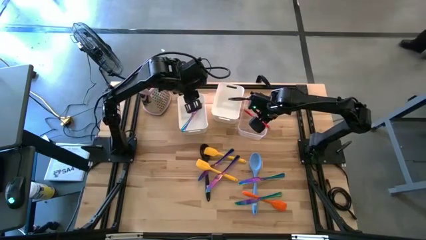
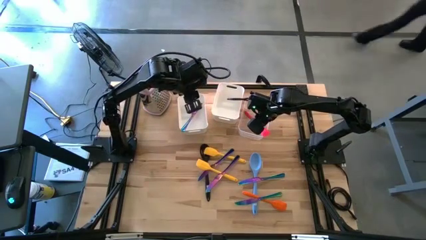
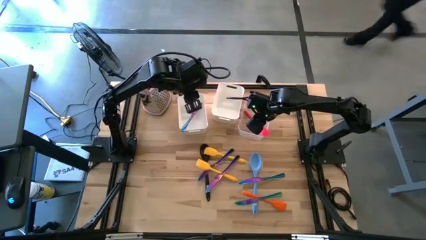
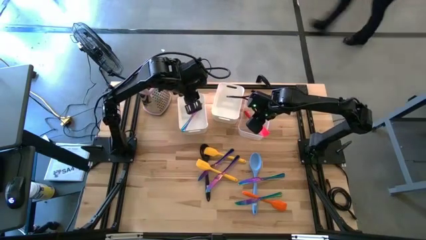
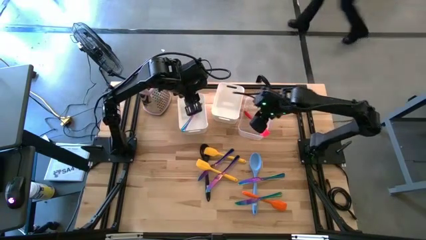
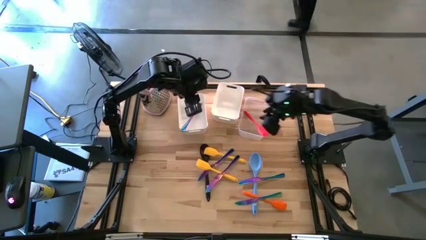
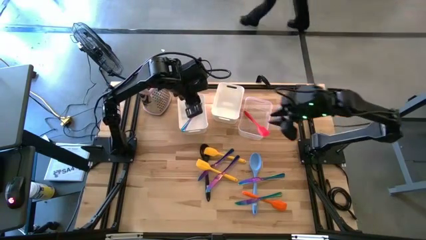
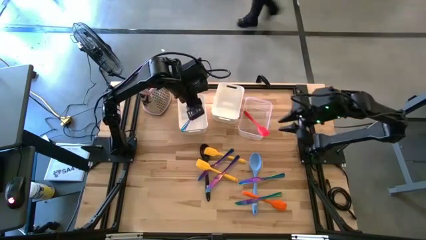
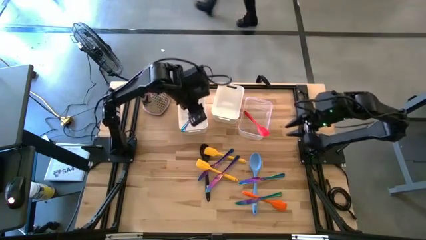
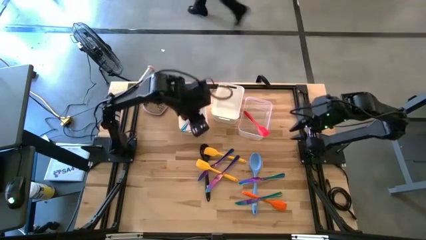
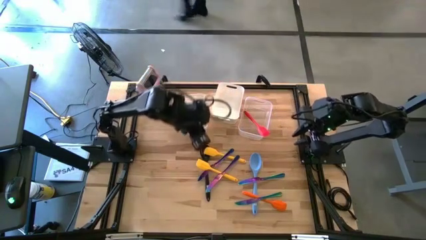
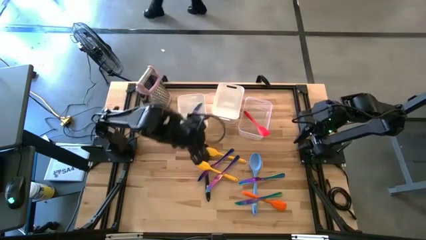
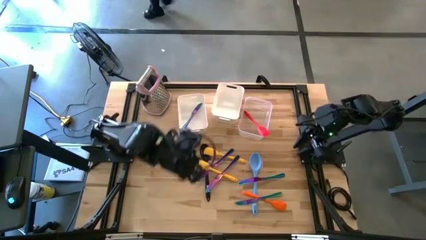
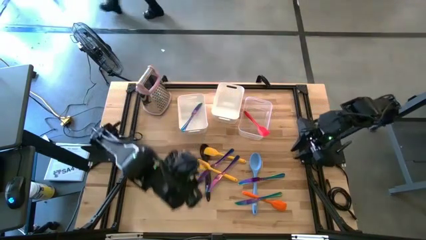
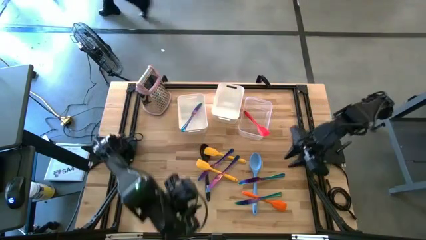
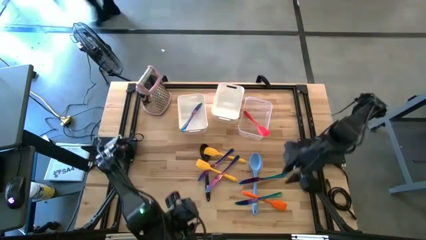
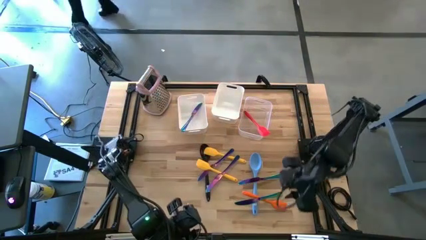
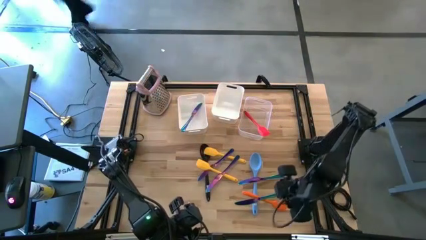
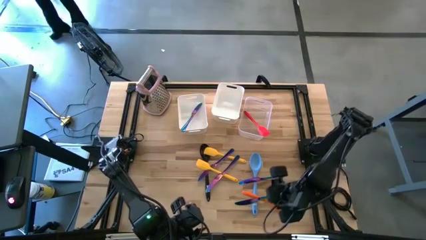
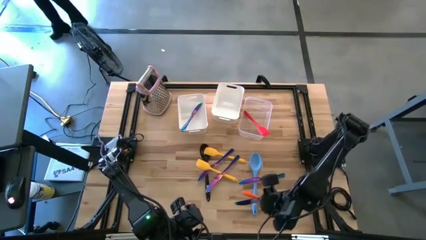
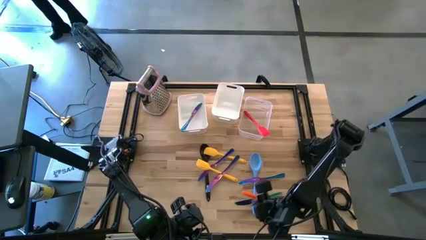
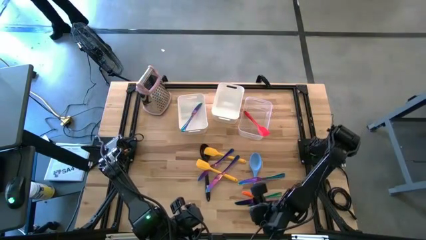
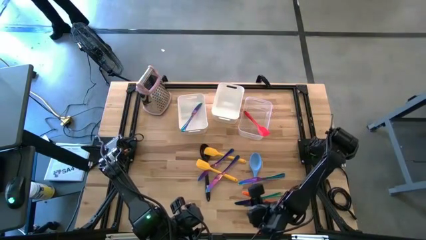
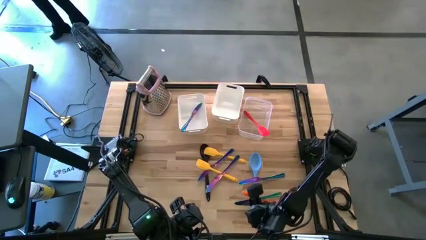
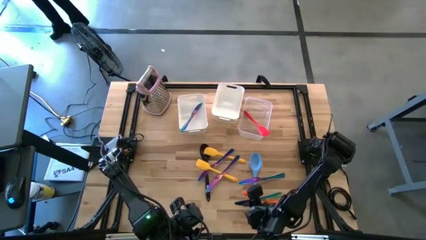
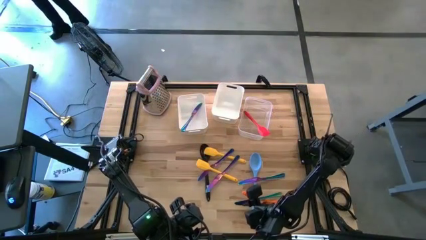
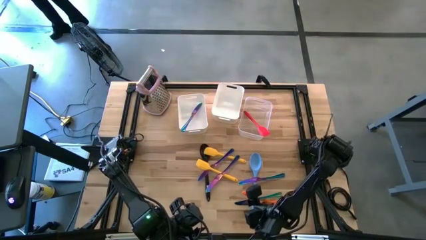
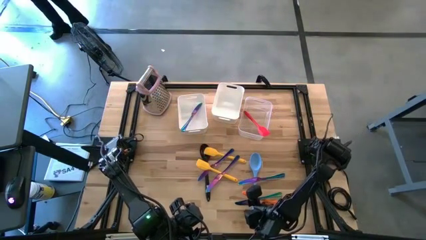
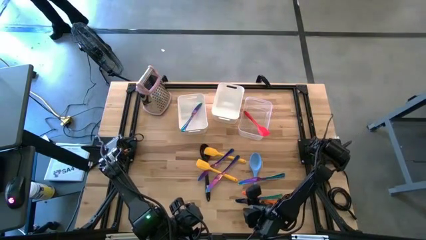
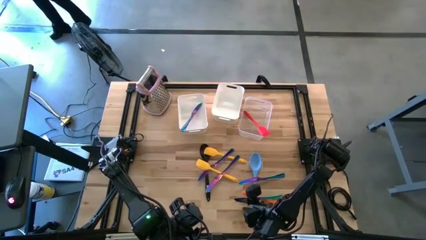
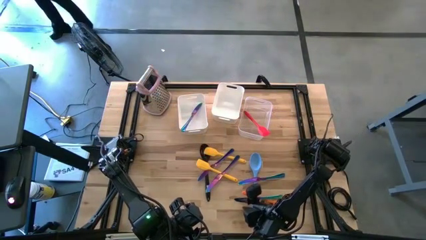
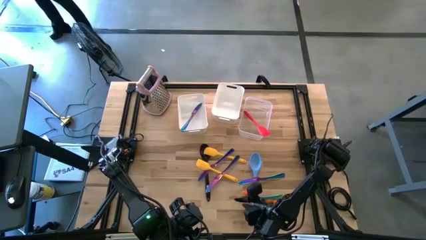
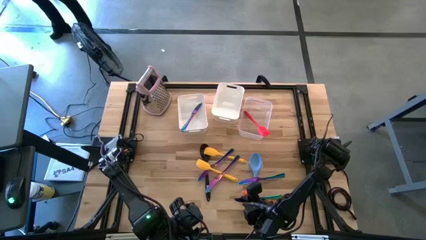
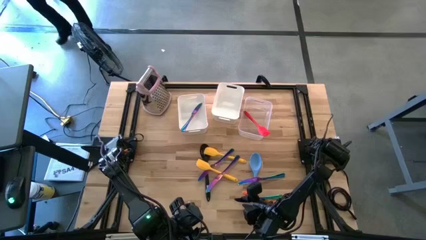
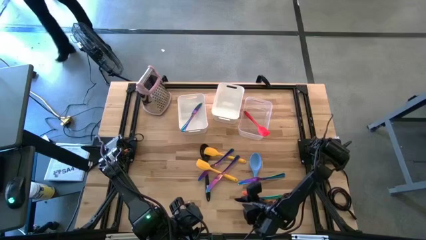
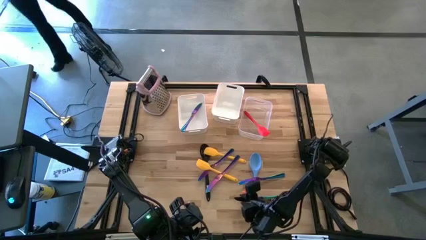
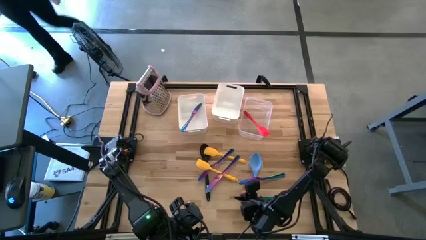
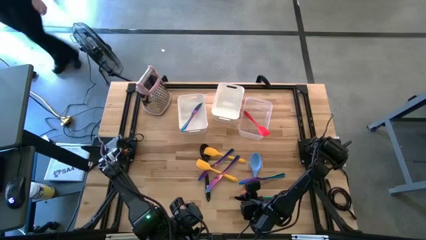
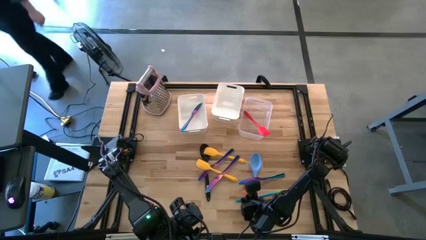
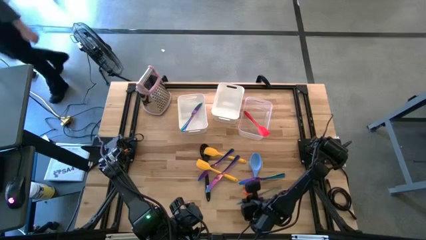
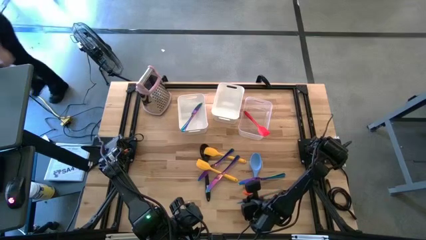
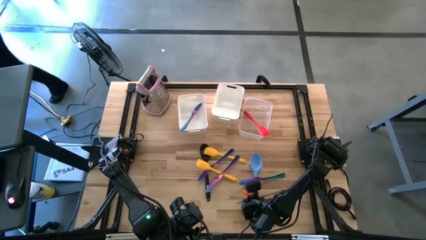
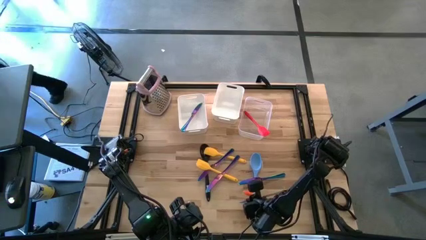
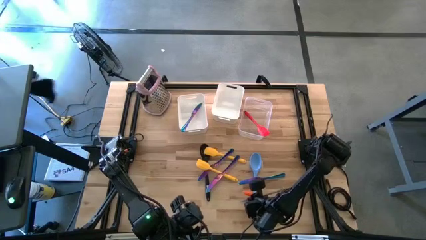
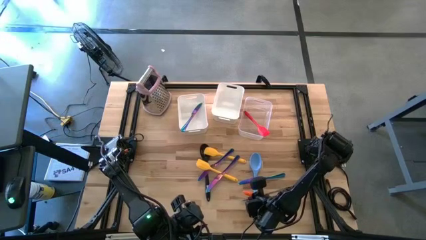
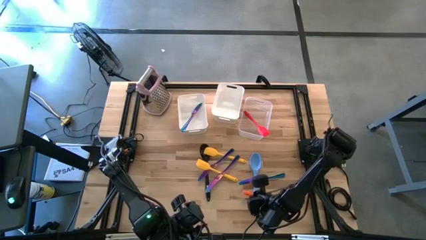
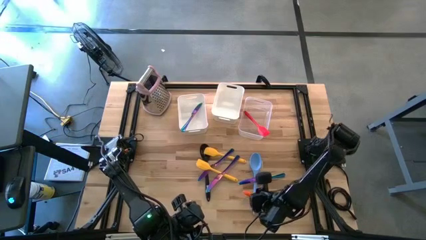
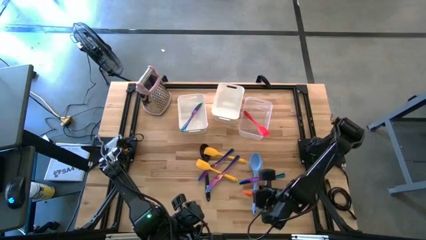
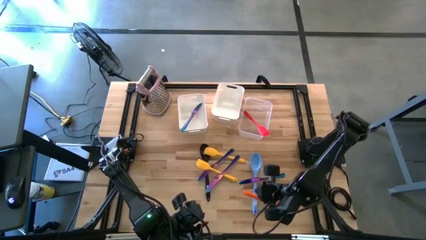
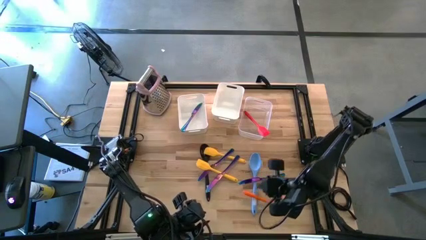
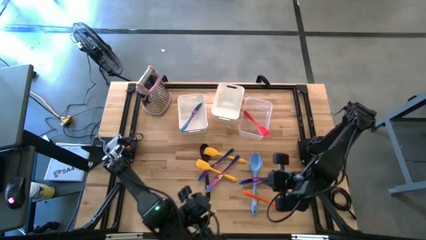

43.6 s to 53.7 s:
Task: Pick & Place Kitchen Items
Put the violet table knife into the left white bin
